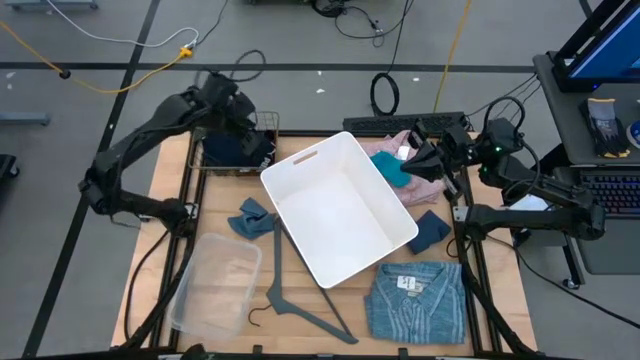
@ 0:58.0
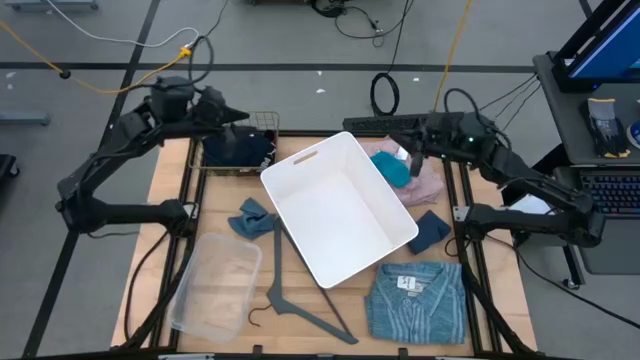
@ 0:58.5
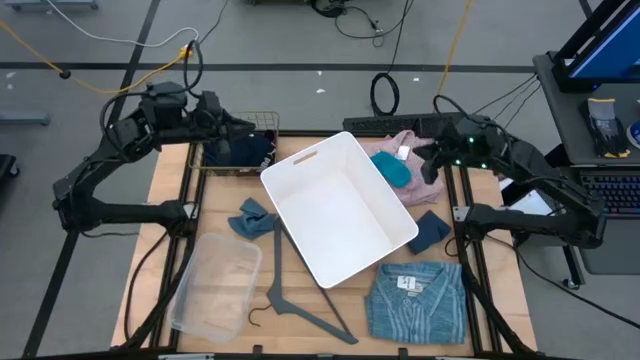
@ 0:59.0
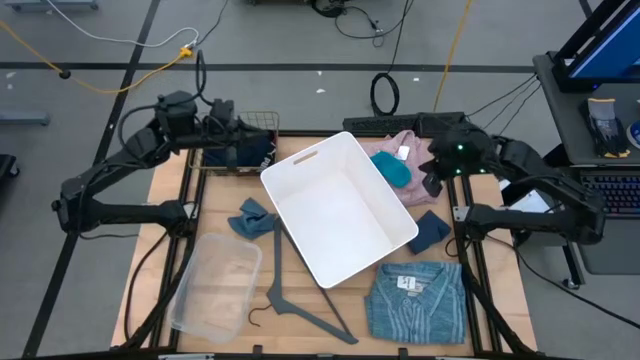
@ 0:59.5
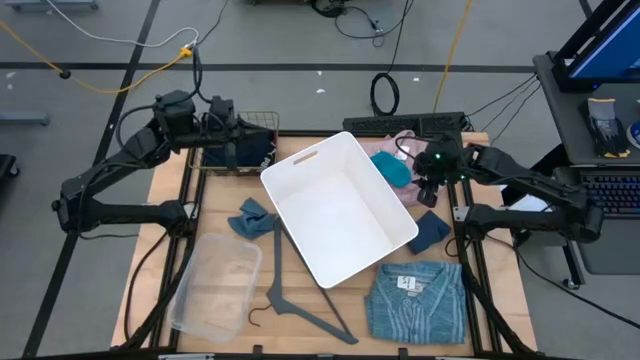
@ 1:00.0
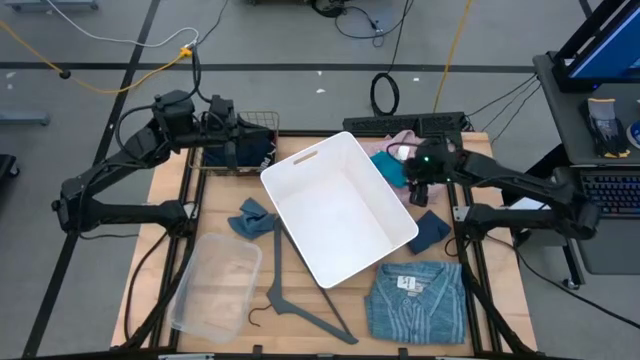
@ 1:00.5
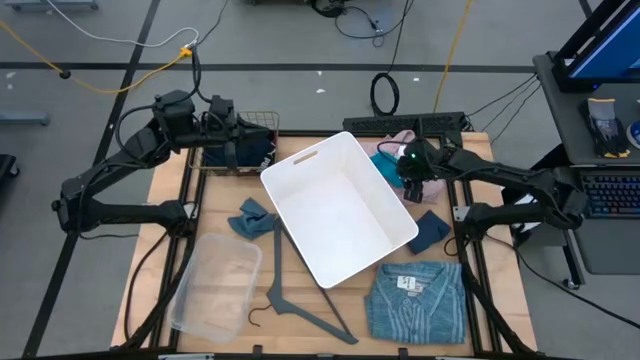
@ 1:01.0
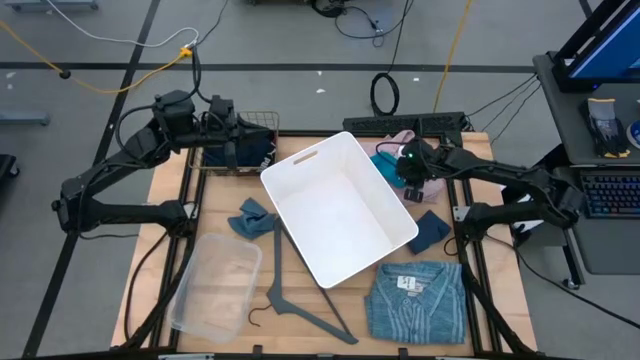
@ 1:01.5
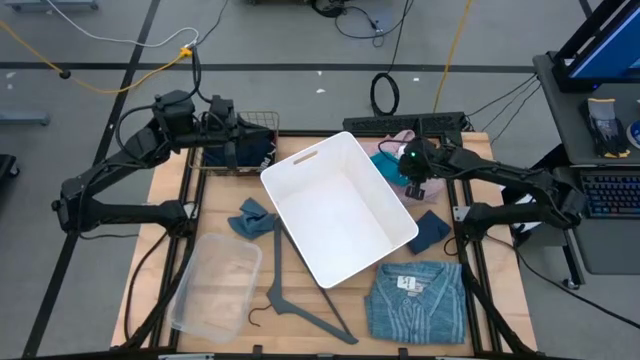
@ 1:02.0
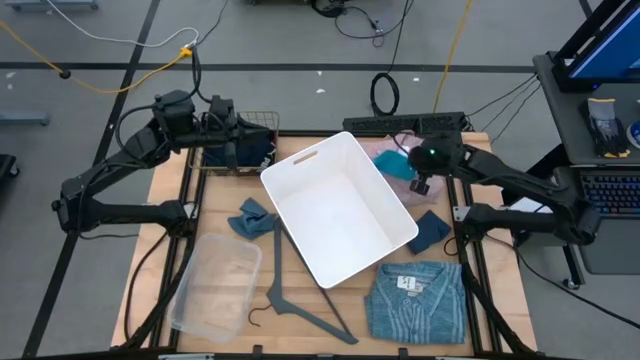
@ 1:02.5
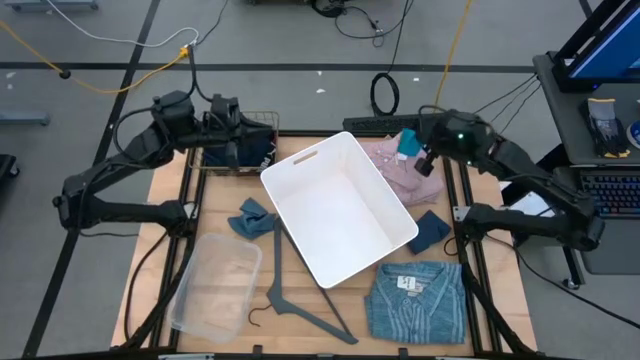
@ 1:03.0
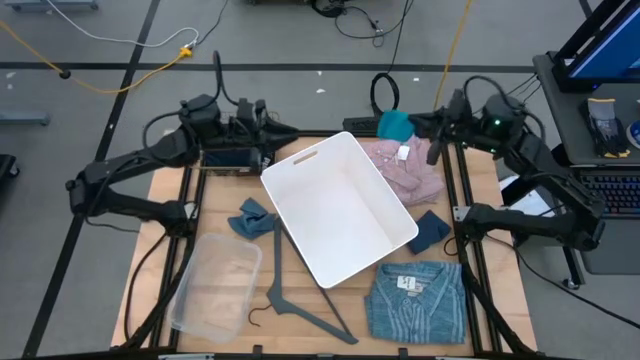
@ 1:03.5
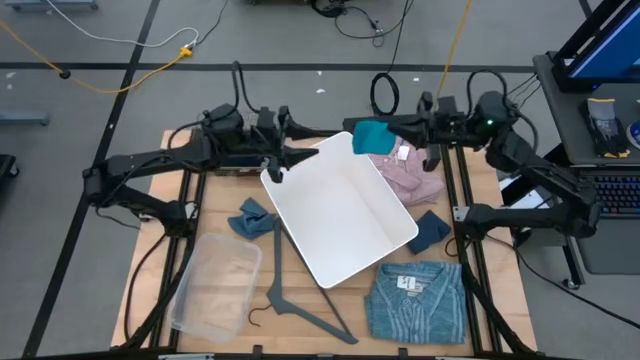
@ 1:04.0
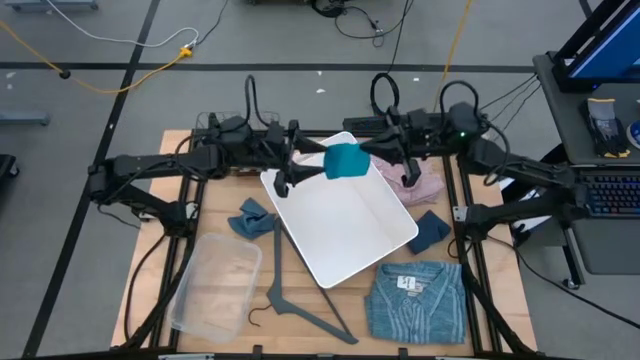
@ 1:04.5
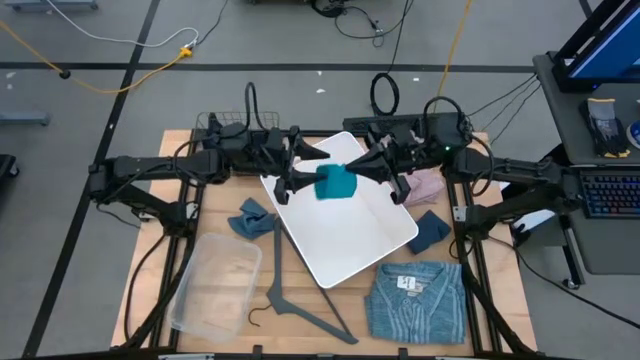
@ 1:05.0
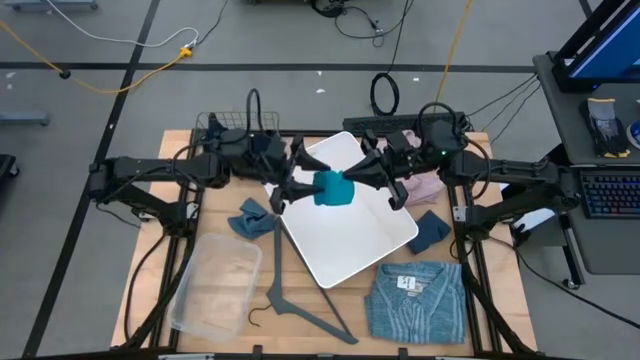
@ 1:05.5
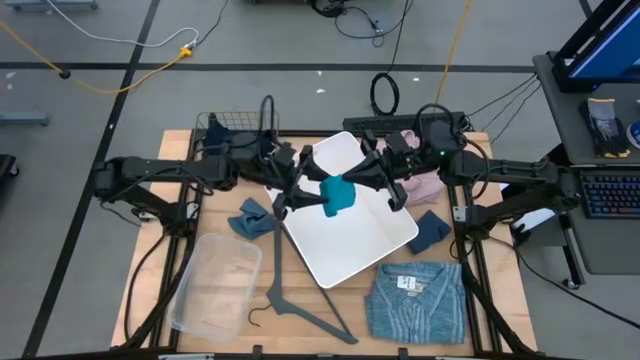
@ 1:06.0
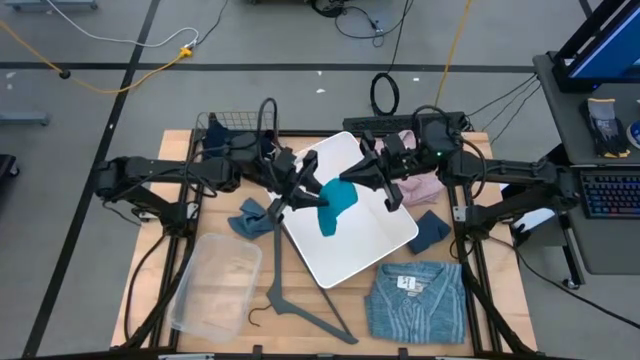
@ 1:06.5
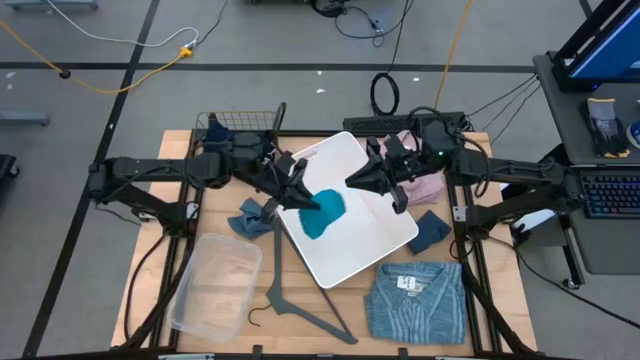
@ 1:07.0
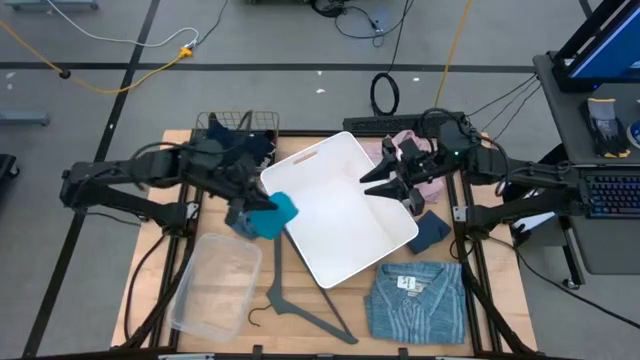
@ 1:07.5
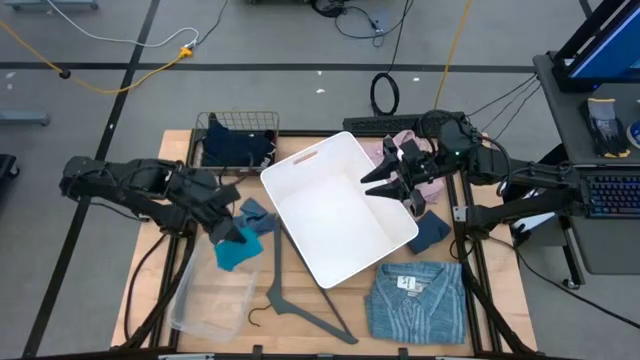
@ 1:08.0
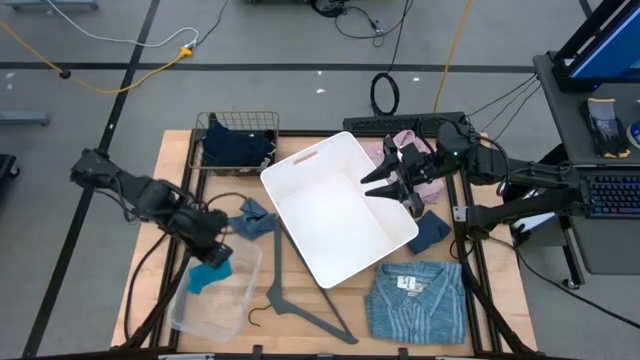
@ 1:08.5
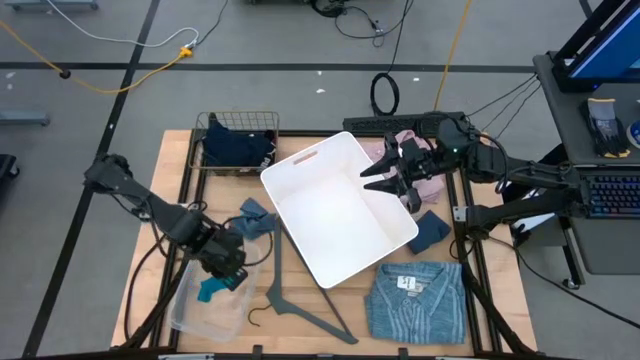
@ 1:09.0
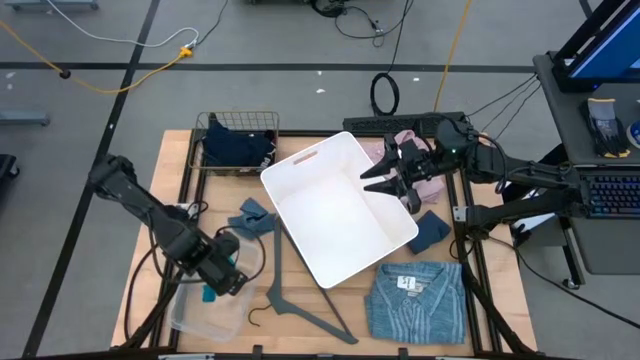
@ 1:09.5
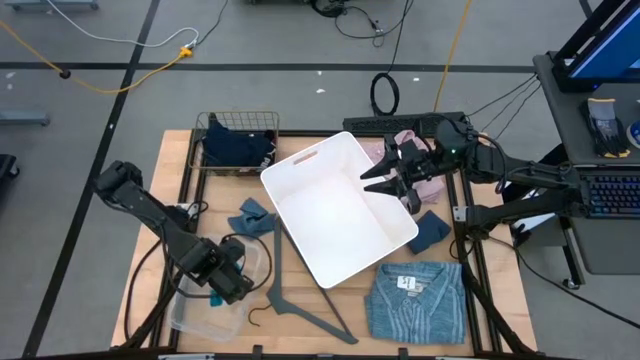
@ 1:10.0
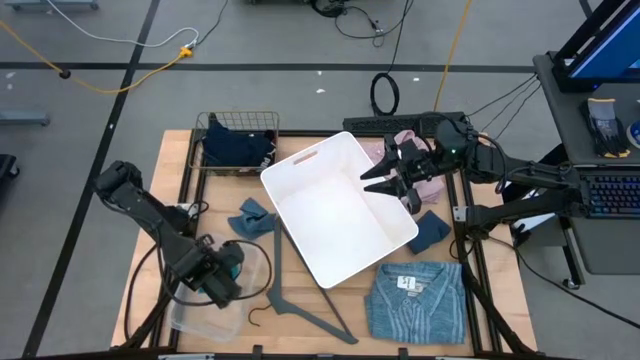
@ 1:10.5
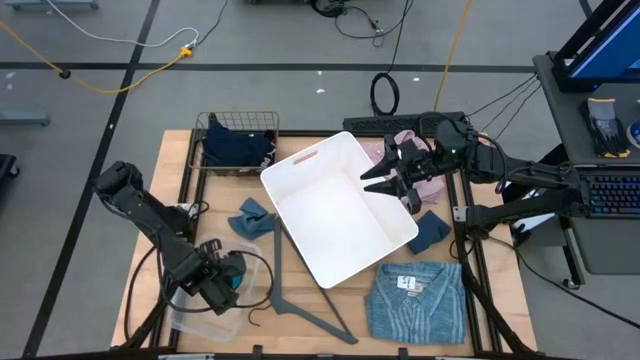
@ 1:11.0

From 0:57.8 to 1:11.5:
Task: Pick & Place Cloths
Put the light blue sock into the transparent bin

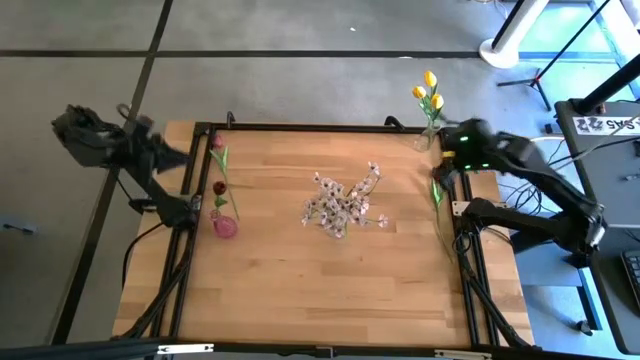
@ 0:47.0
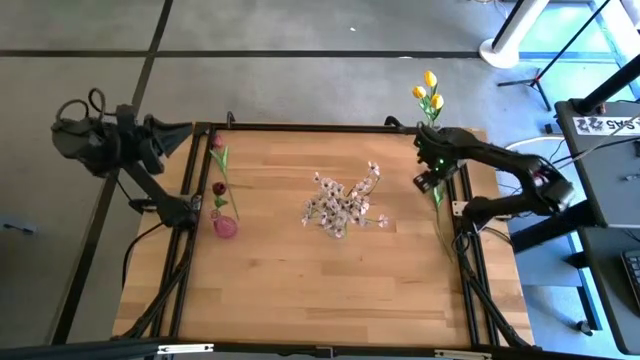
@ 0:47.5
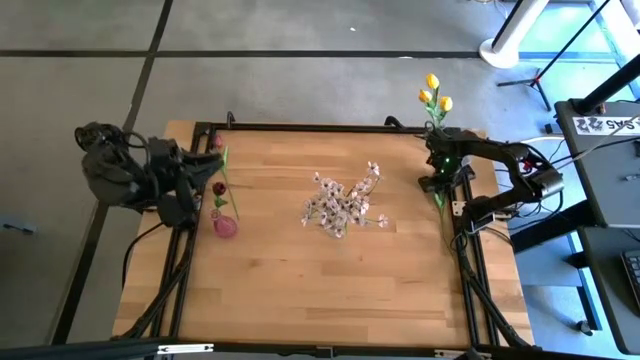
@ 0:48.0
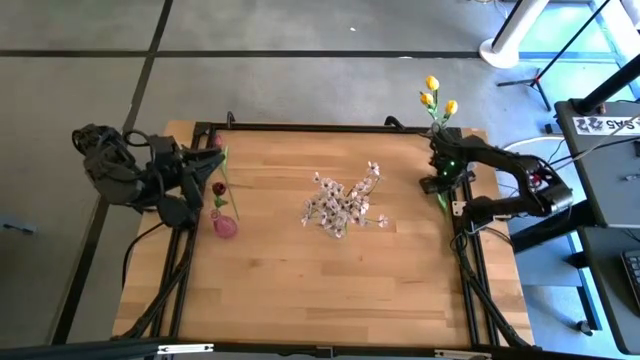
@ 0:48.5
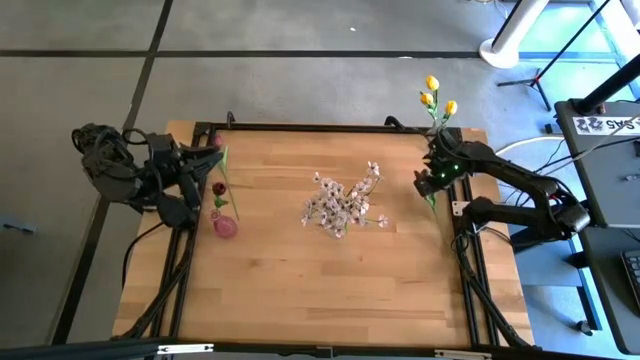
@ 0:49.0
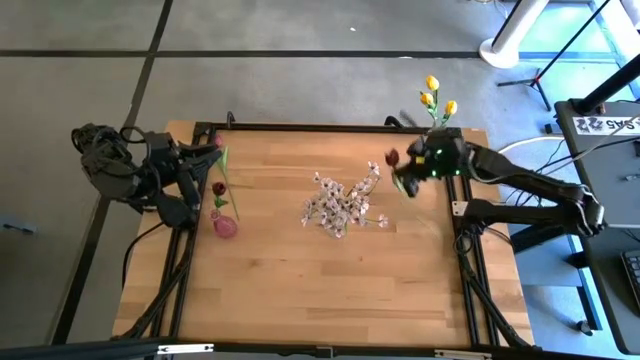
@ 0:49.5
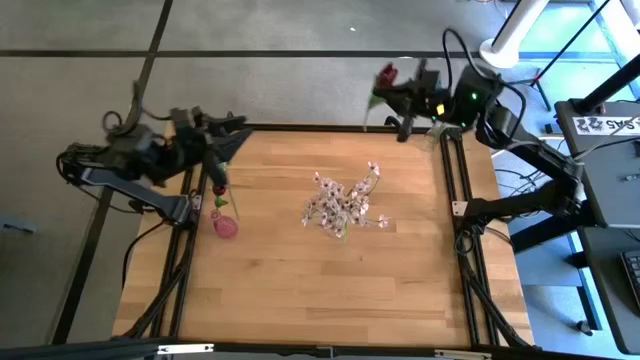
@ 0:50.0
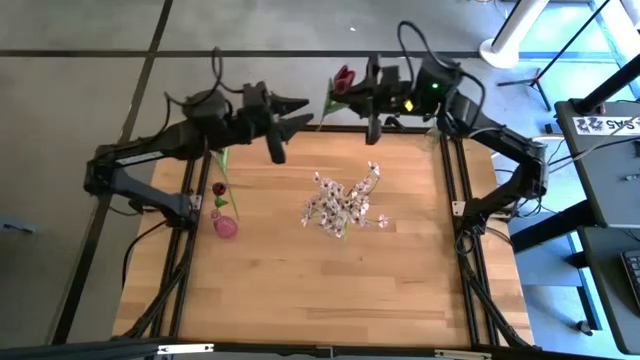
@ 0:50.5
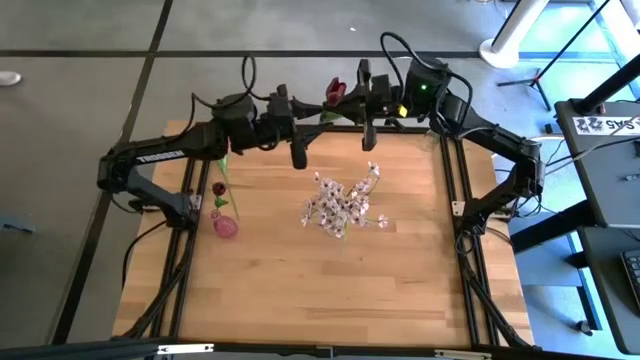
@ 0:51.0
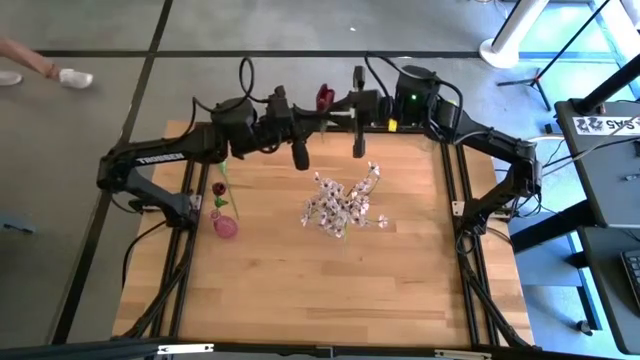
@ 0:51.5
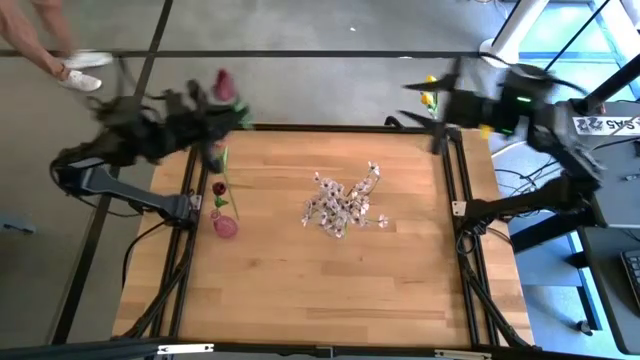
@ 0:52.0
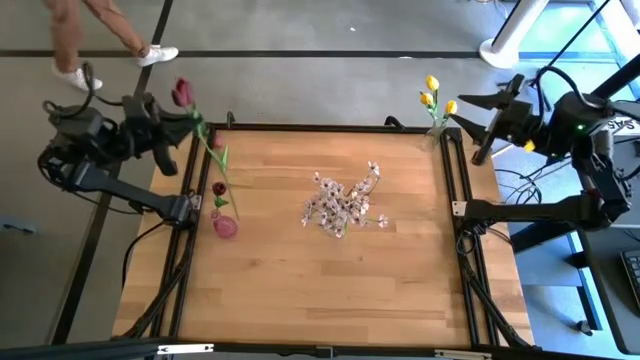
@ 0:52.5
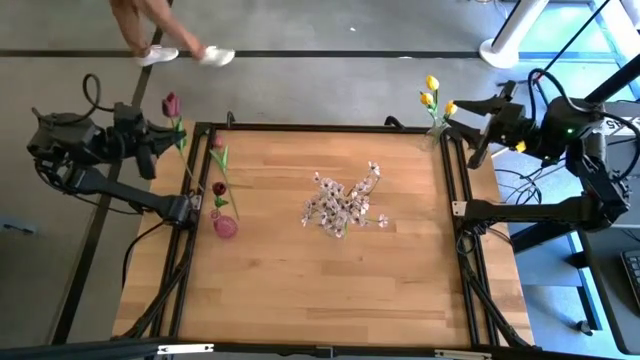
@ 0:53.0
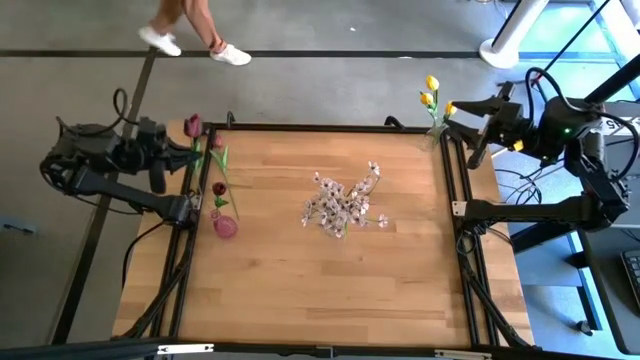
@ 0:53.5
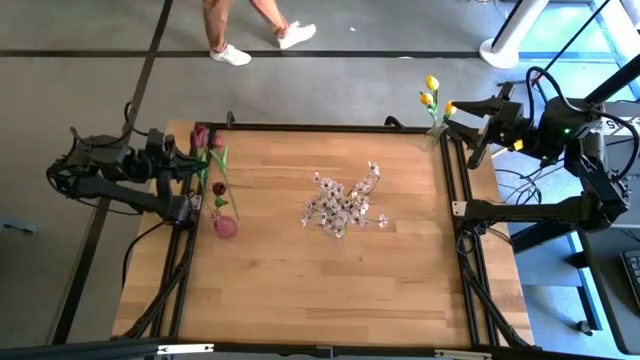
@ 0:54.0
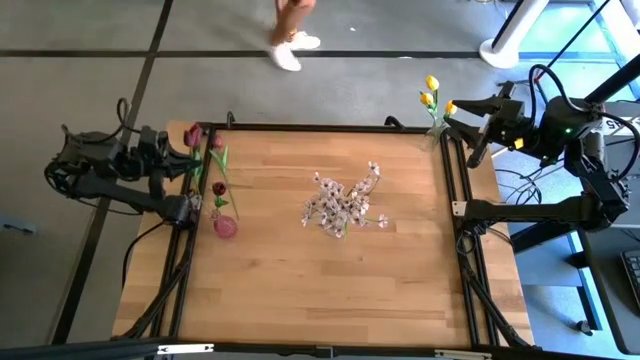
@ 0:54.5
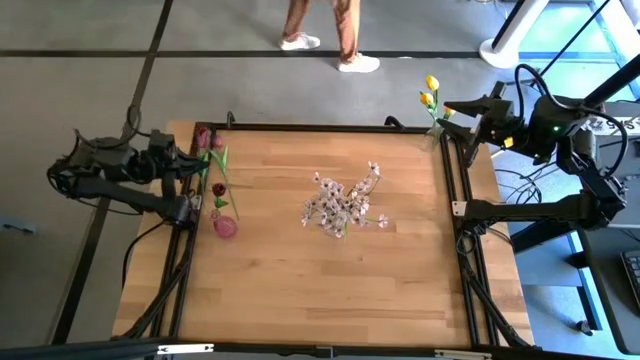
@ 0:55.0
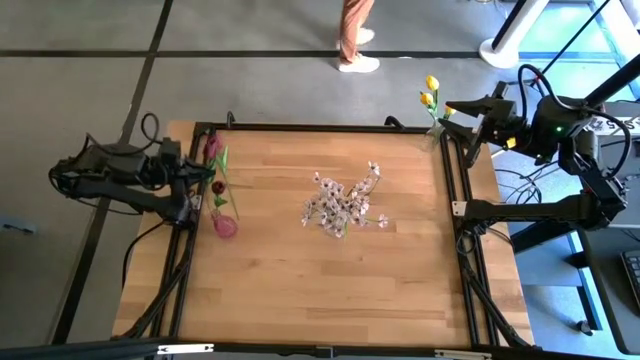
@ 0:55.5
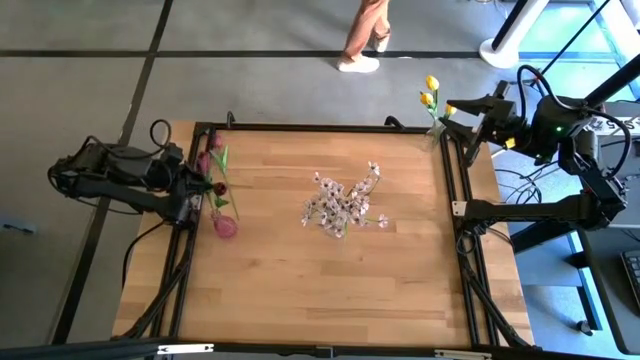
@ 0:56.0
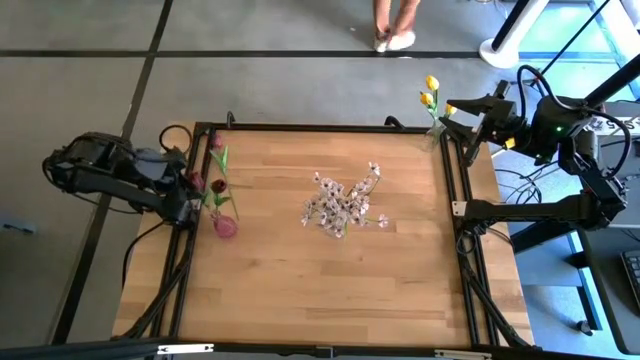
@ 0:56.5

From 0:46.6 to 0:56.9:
Task: Sort flowers into vase by color
Put the right red tulip into the violet vase
